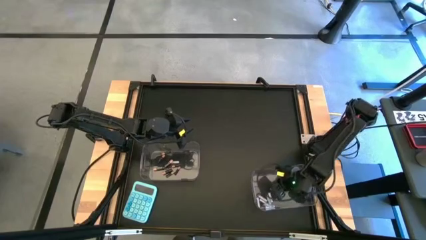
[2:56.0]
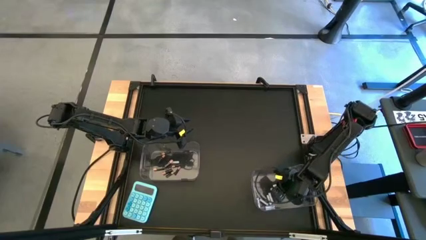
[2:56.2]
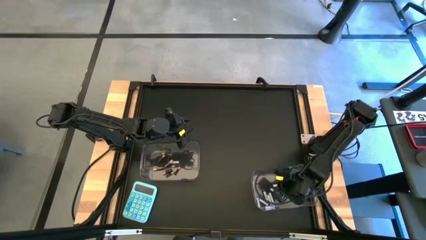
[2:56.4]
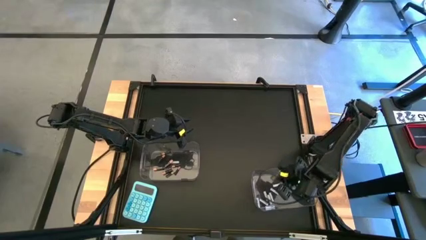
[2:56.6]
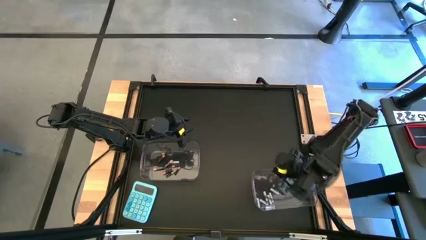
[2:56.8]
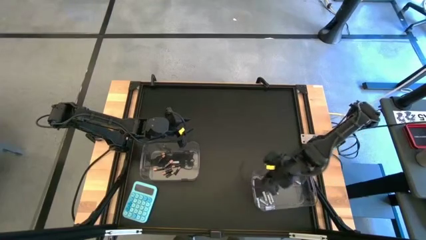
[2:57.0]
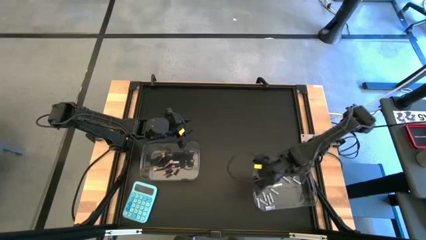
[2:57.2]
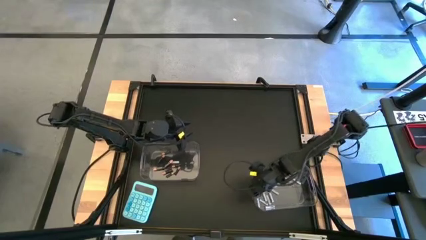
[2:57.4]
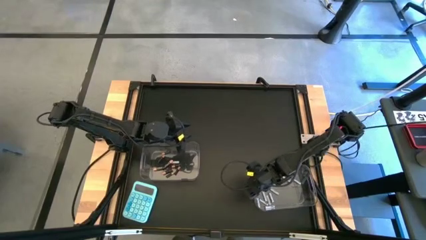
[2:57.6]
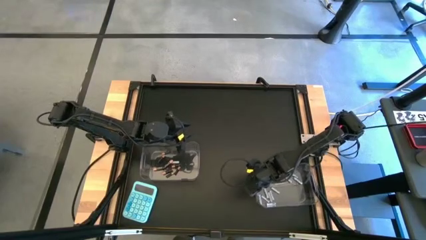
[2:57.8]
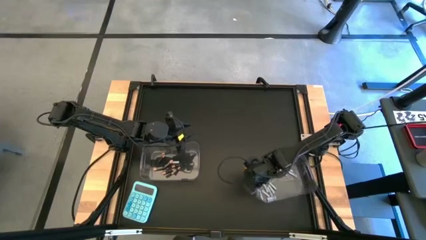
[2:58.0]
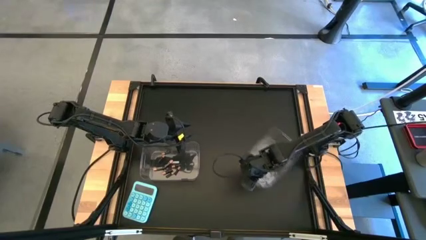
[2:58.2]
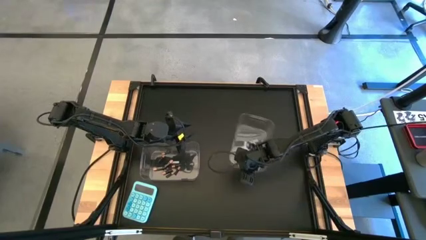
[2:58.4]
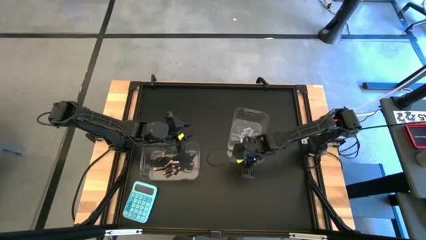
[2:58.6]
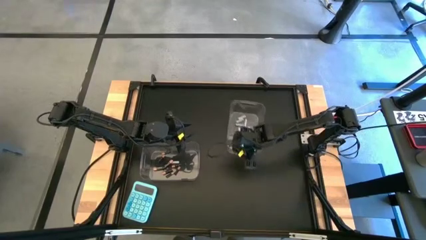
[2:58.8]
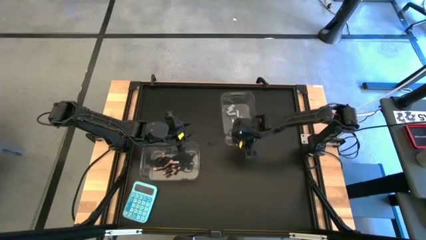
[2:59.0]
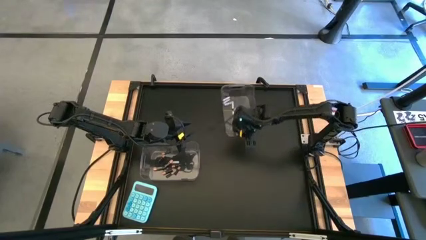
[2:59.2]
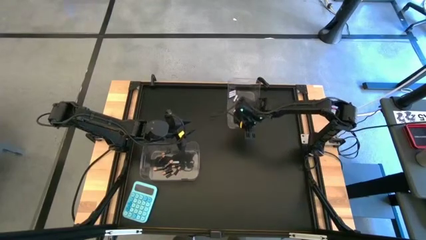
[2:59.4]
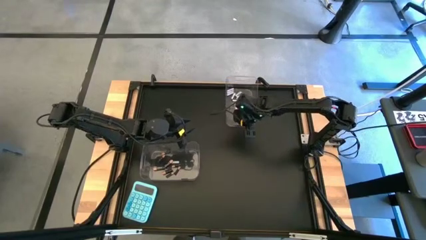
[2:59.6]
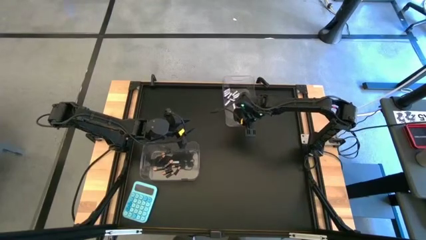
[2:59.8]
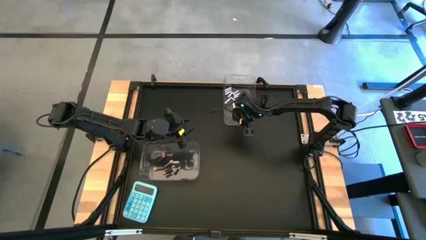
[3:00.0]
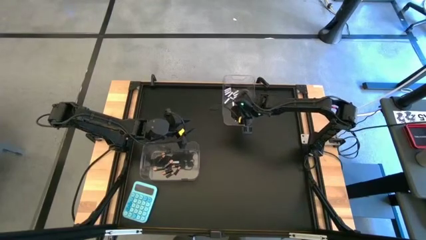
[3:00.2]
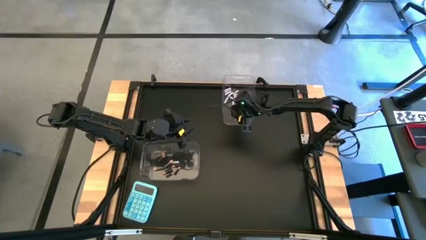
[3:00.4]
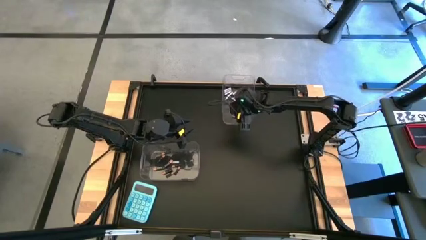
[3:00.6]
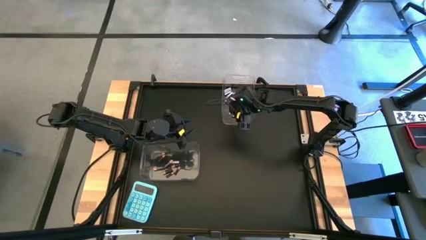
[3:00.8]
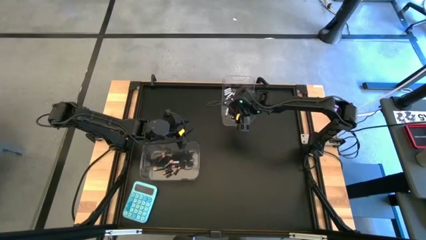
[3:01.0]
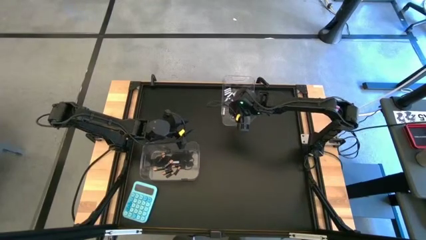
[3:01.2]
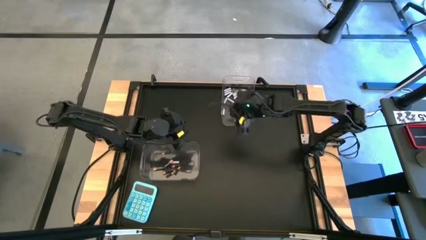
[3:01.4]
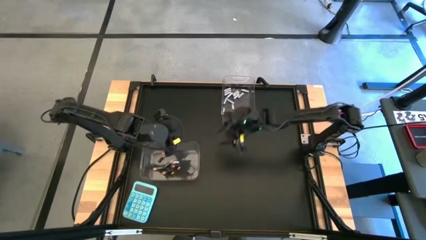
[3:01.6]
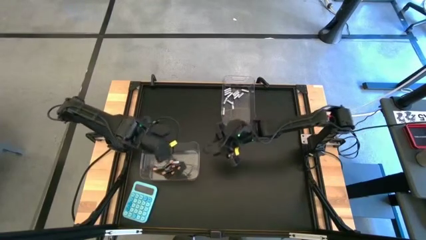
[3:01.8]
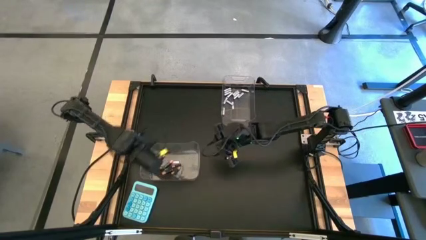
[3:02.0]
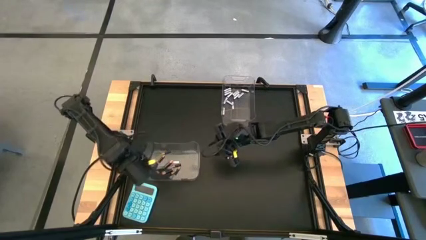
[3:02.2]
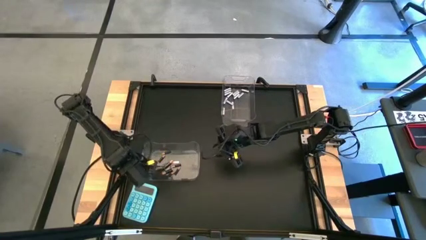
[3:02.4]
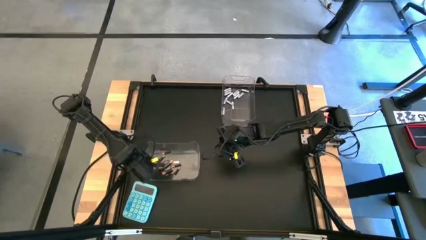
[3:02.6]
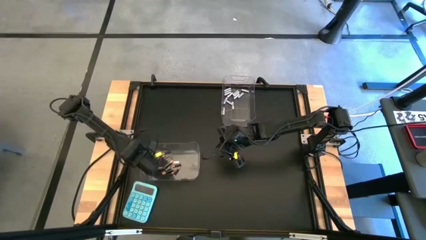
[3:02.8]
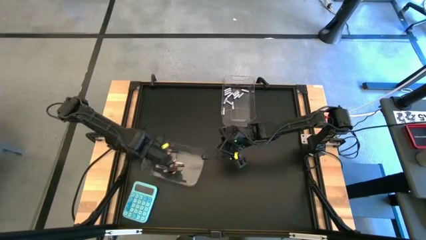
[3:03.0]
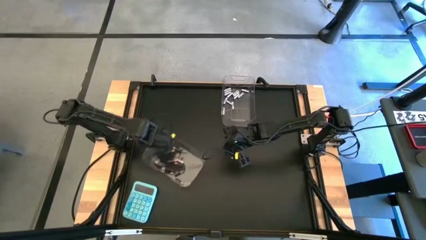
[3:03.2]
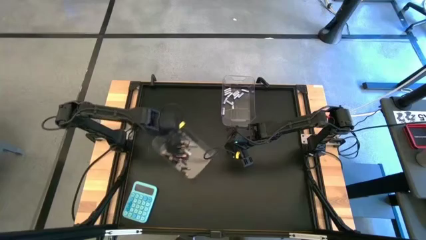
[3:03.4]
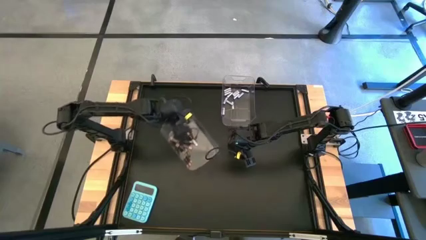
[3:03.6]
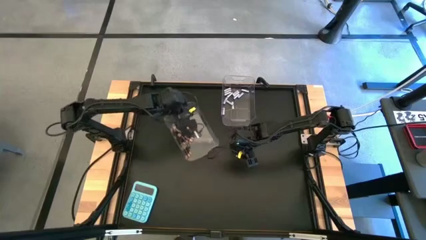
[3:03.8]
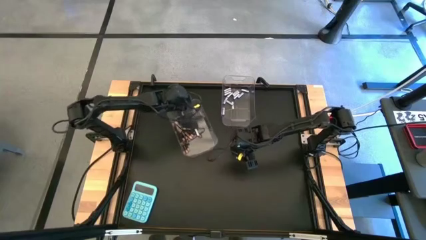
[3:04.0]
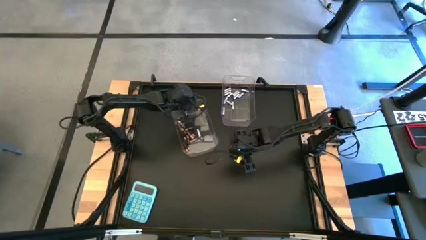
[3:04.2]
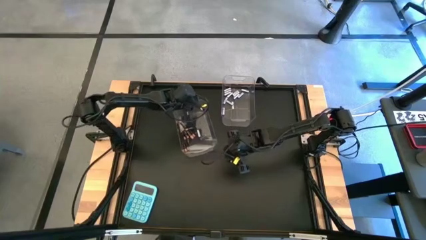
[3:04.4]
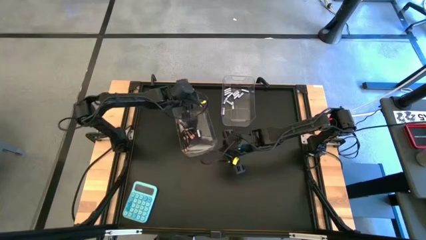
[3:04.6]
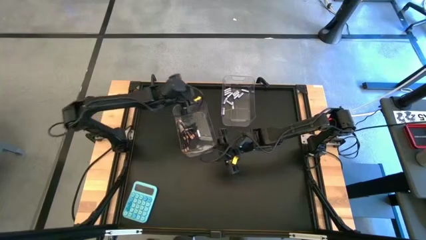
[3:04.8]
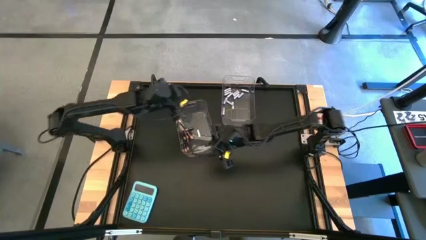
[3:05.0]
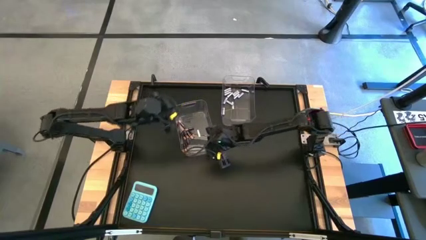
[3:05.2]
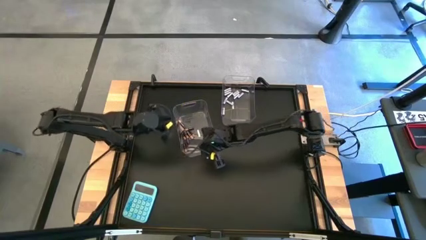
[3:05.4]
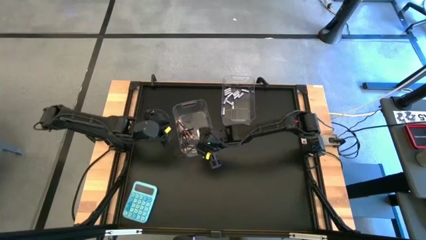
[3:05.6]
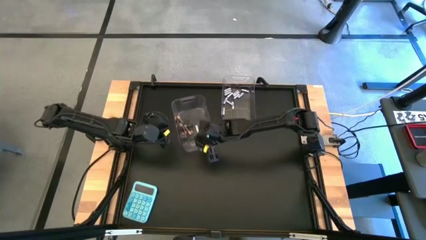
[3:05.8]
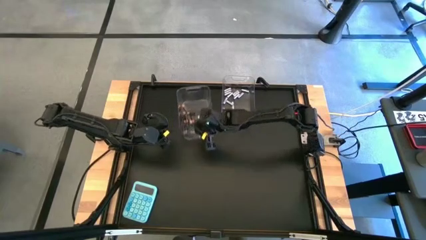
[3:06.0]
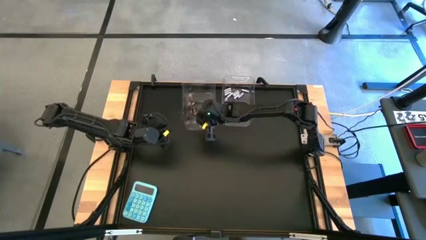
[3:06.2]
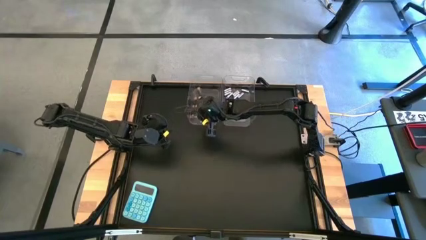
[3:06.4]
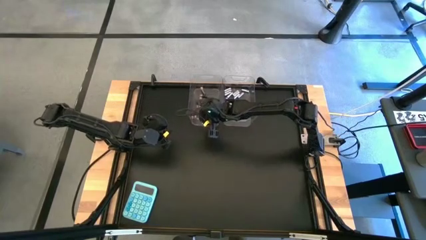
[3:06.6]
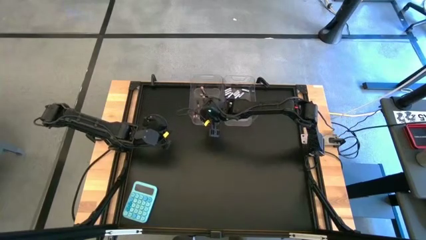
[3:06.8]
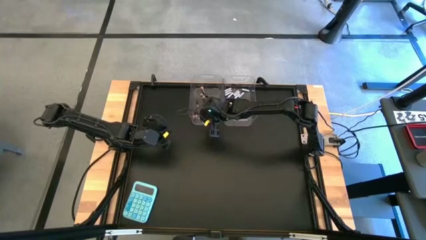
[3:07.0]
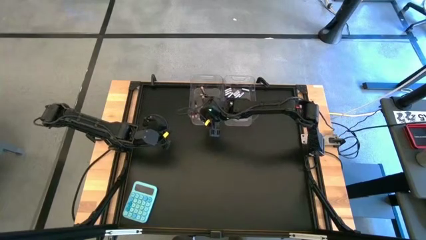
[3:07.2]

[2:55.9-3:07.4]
Task: Sort batteries
Move the transparent bins to the top center of the table

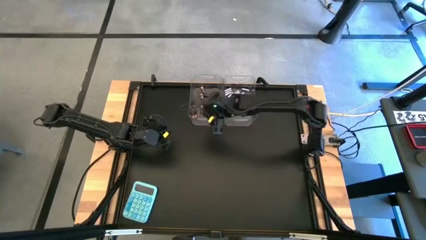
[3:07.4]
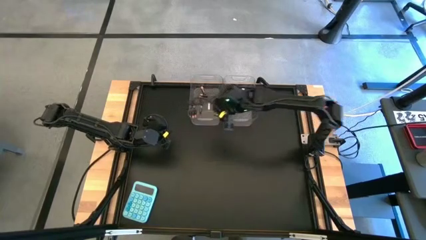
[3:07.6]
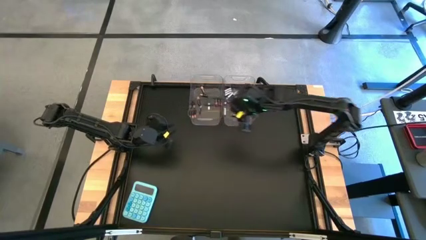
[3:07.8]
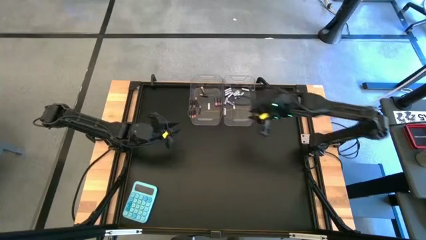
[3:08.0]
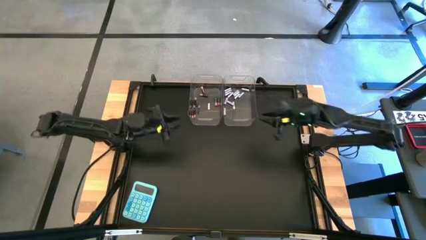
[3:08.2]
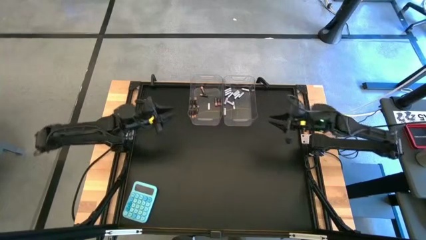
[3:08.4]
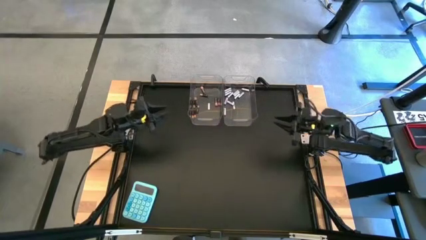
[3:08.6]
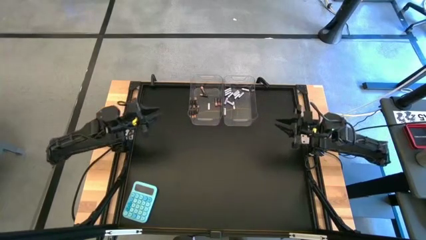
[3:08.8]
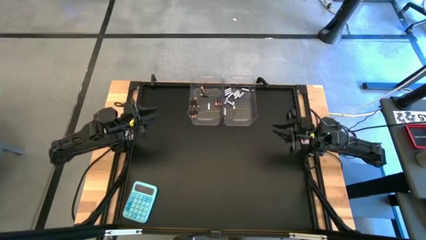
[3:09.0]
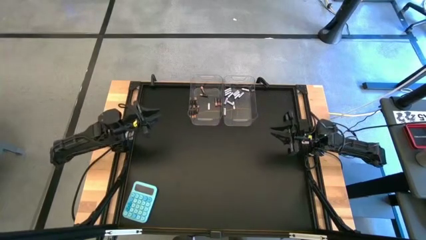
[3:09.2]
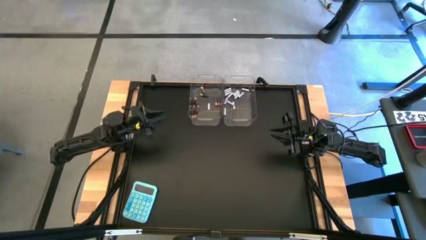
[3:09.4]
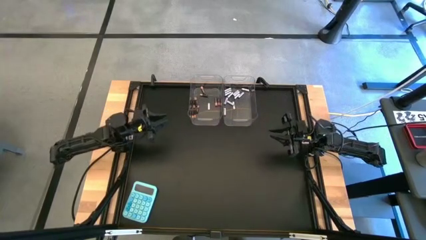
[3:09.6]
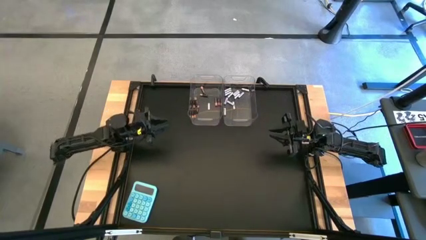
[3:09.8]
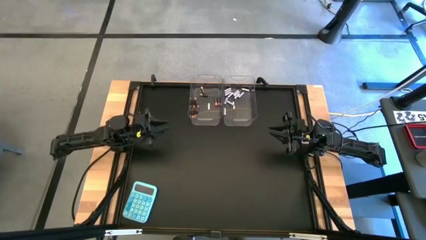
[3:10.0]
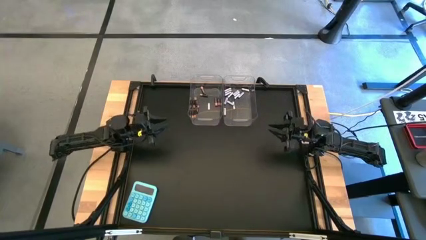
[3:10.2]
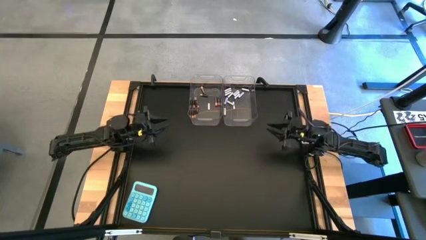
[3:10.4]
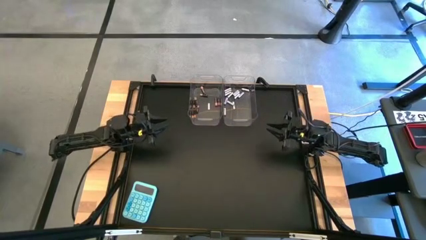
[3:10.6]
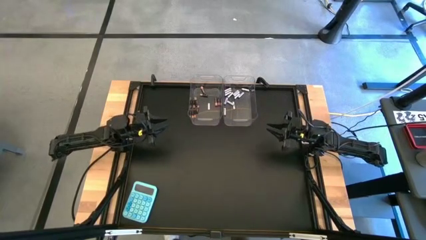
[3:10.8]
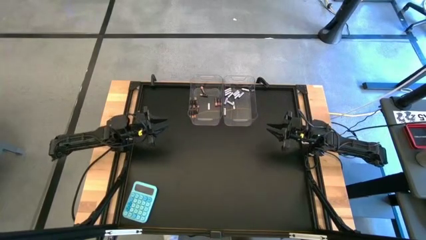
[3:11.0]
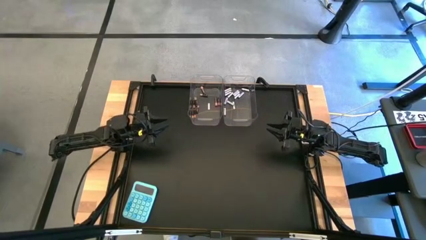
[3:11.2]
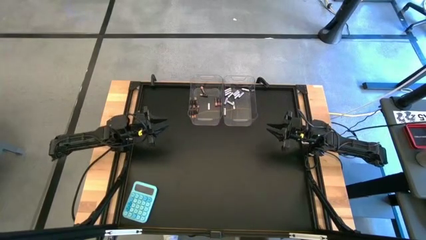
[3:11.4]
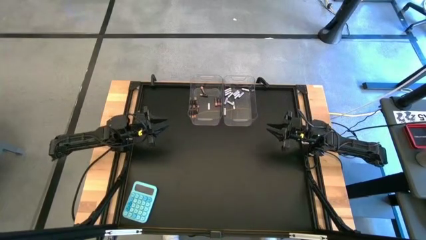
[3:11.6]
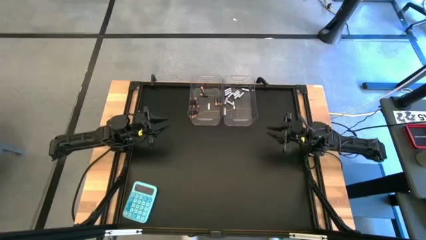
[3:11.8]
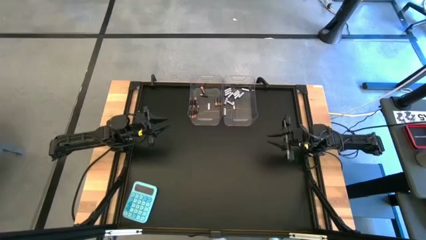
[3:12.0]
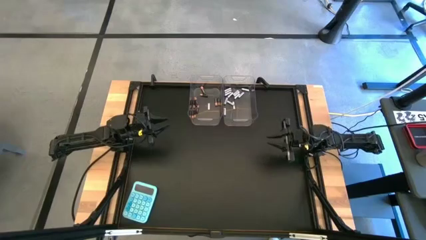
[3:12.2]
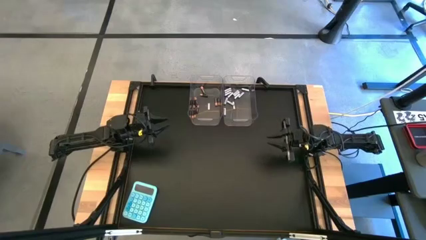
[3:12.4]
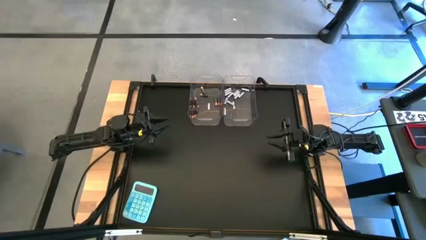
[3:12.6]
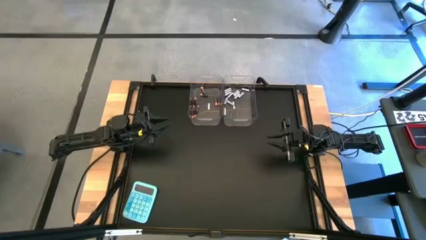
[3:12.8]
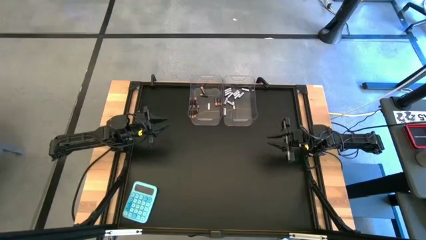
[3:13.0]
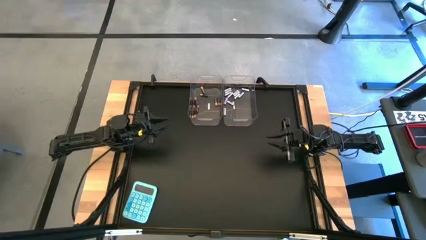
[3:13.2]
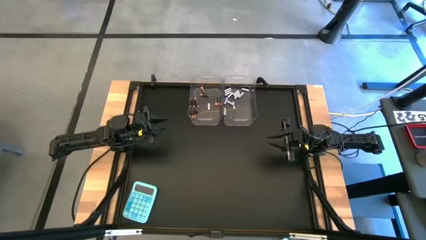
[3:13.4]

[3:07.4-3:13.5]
Return to Home Position
